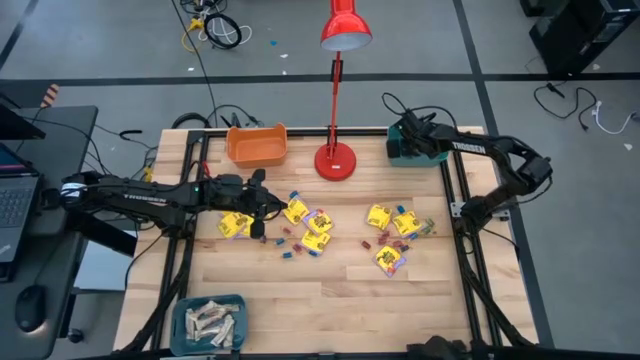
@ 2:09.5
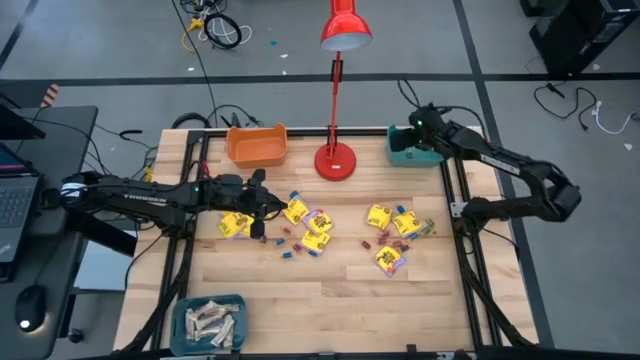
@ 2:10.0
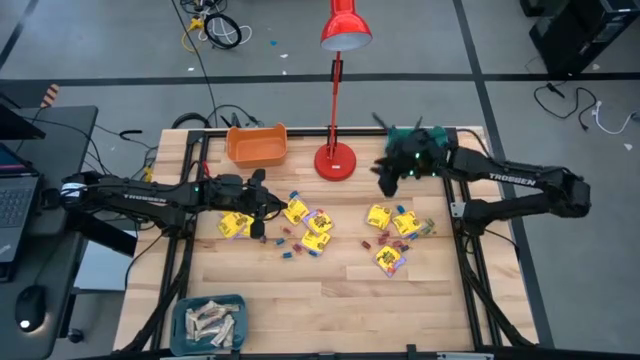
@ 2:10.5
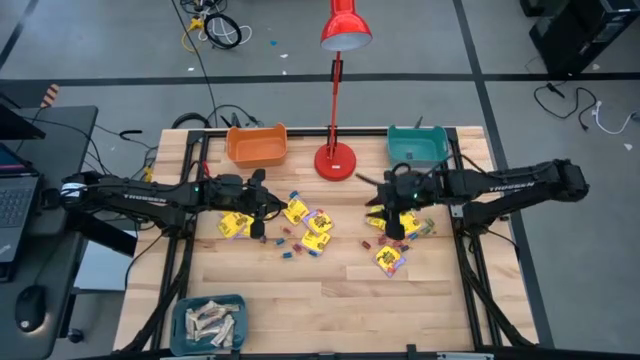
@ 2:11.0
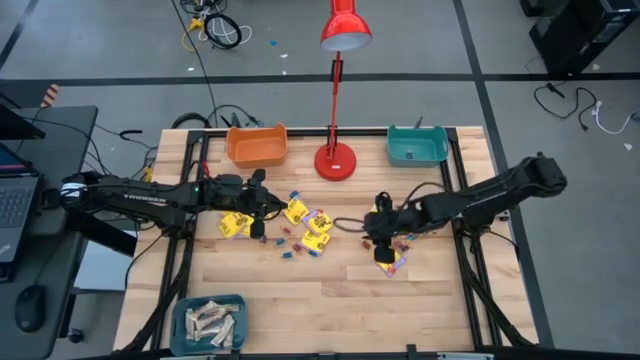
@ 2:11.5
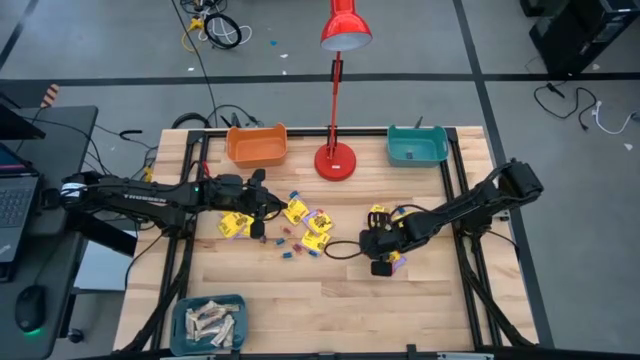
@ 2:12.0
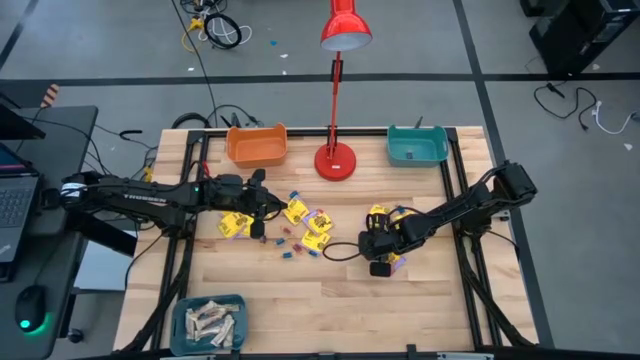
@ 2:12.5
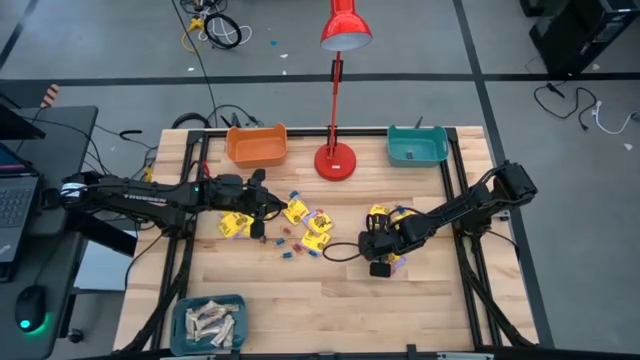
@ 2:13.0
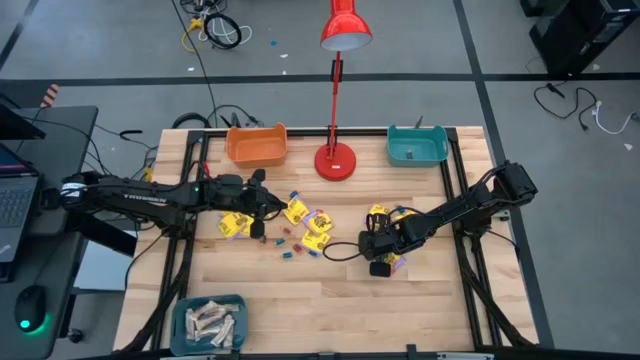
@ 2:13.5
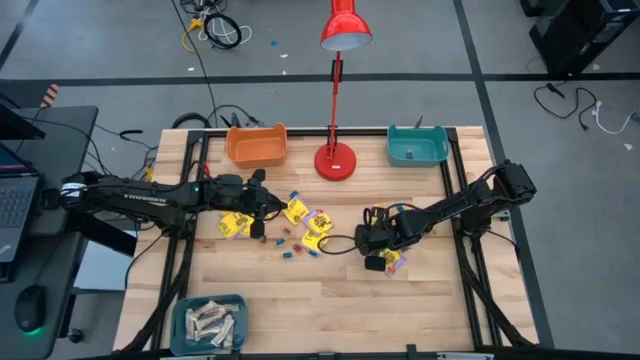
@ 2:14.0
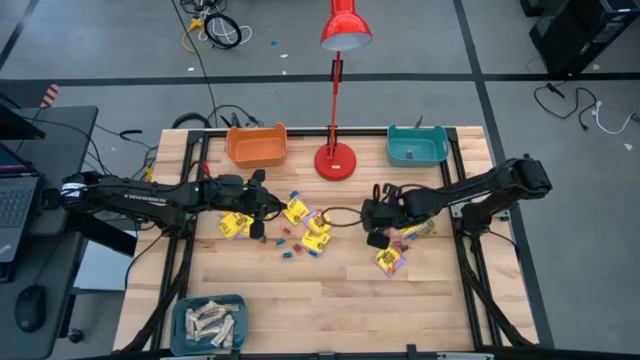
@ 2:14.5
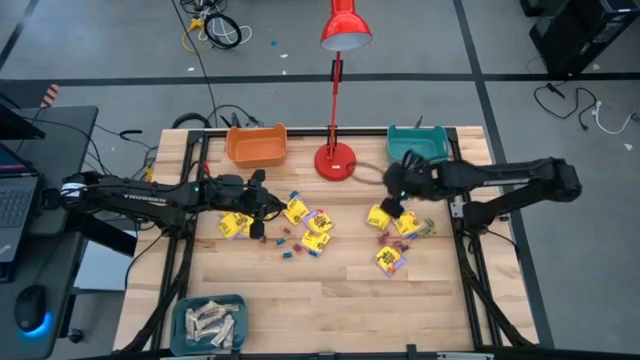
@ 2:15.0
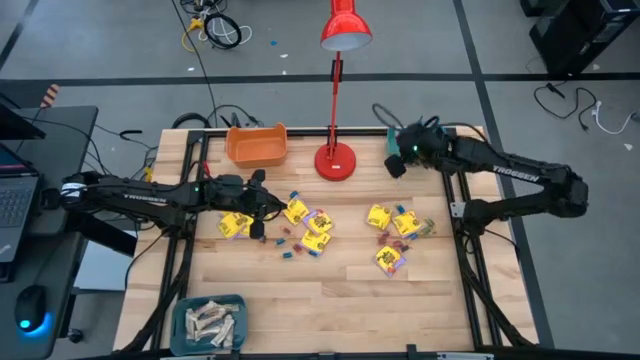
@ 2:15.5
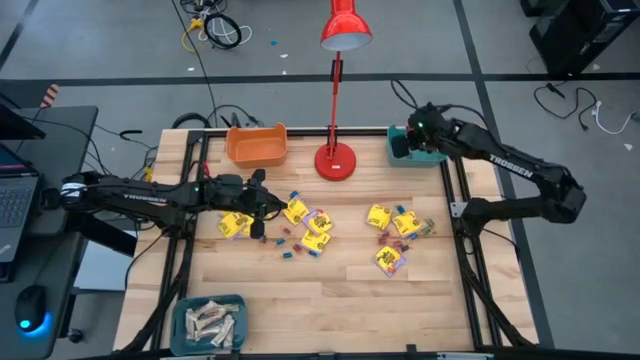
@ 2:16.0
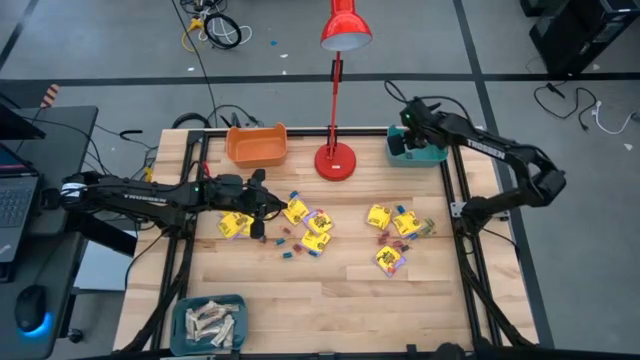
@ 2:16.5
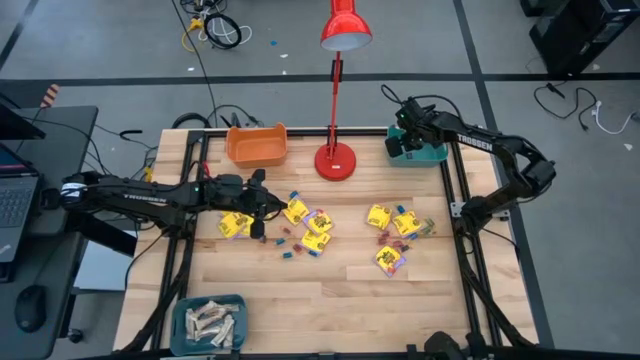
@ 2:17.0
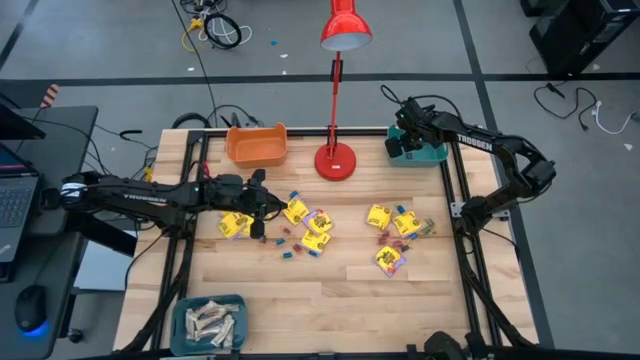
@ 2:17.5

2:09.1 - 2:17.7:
Task: Sort candy
Put the small red candy into the green bin

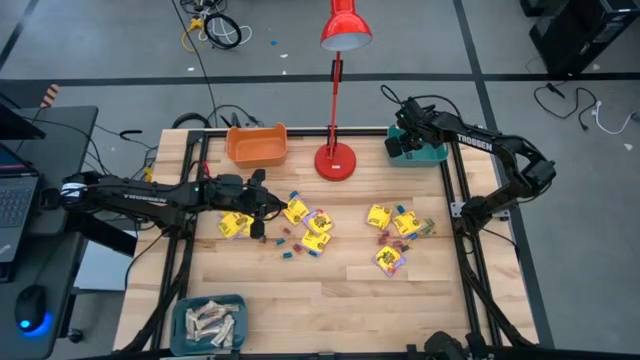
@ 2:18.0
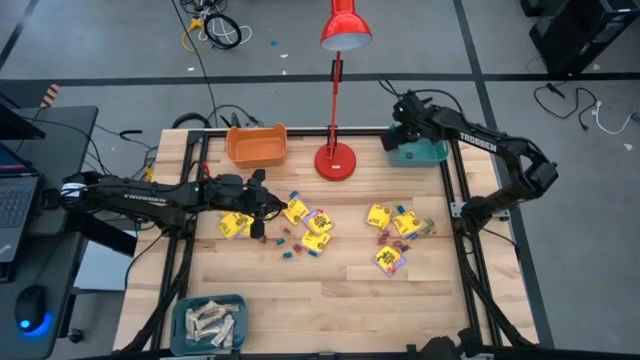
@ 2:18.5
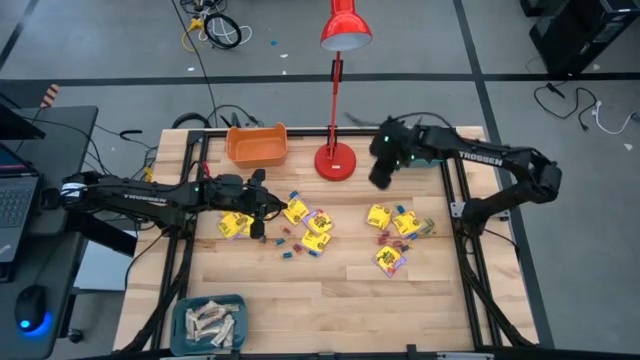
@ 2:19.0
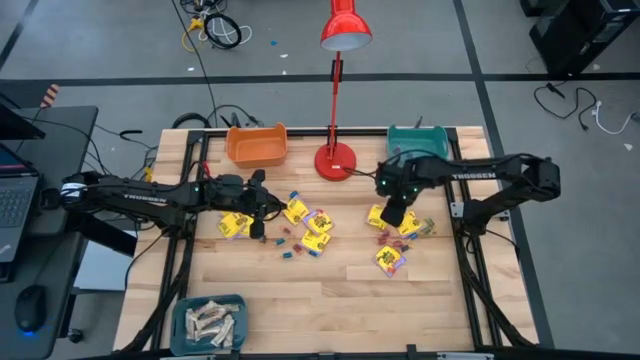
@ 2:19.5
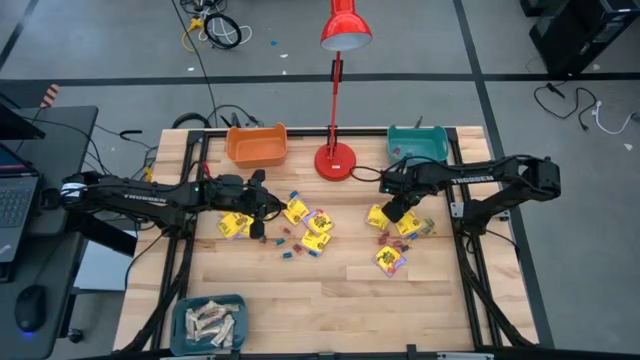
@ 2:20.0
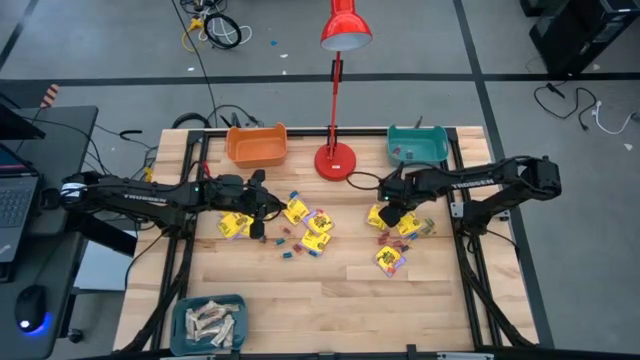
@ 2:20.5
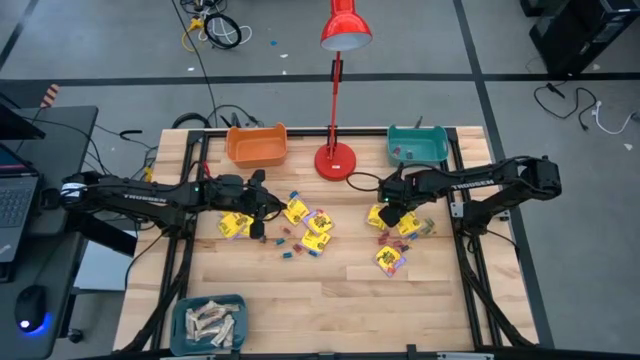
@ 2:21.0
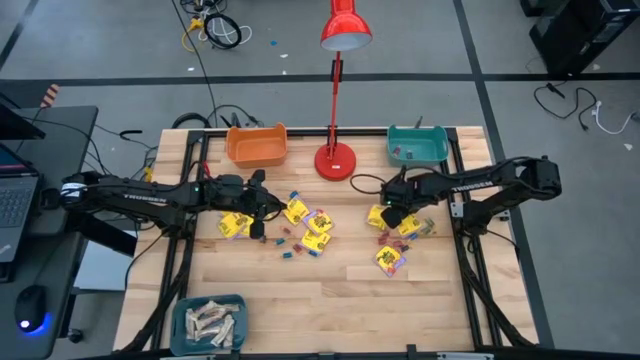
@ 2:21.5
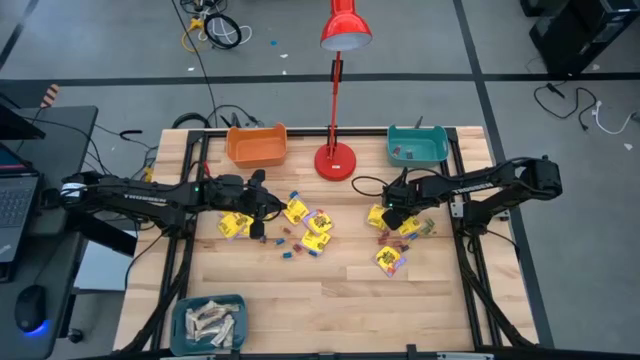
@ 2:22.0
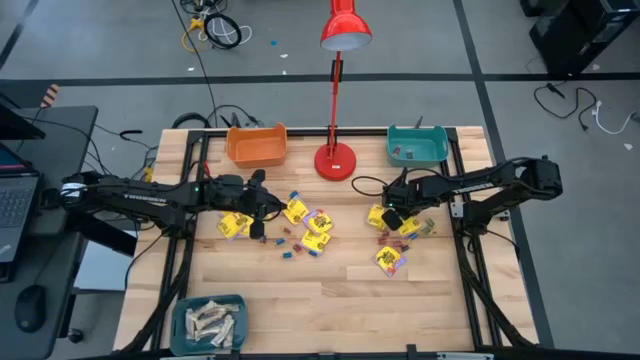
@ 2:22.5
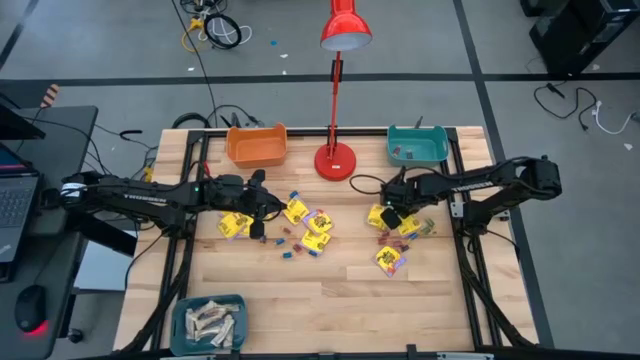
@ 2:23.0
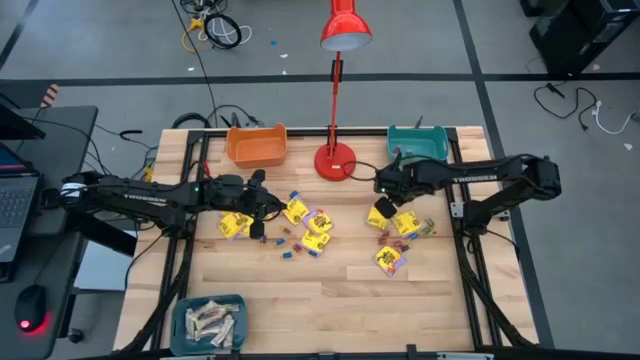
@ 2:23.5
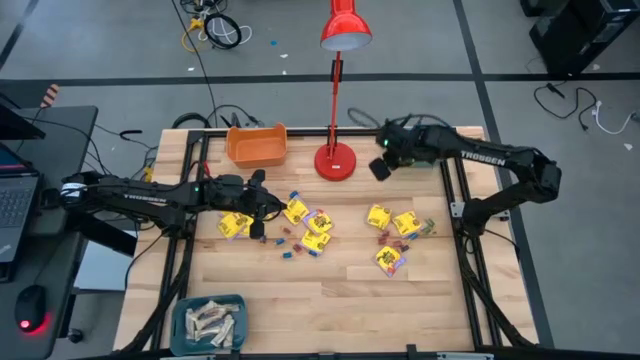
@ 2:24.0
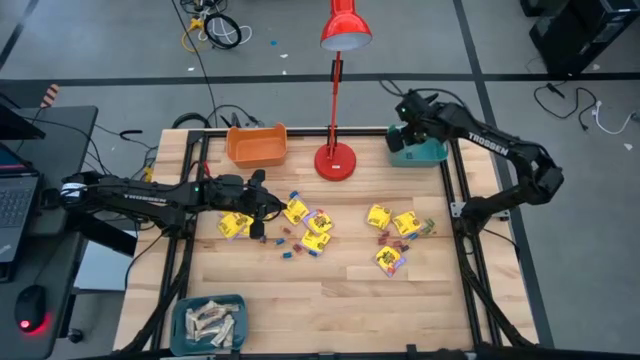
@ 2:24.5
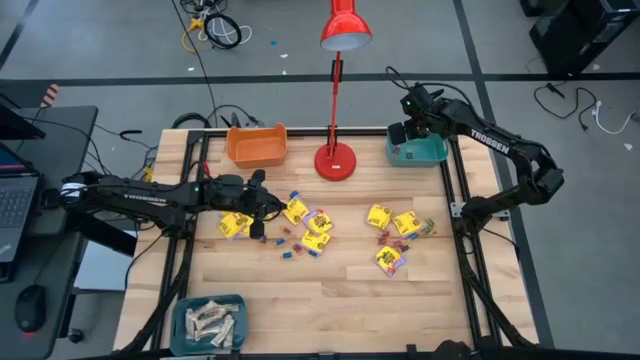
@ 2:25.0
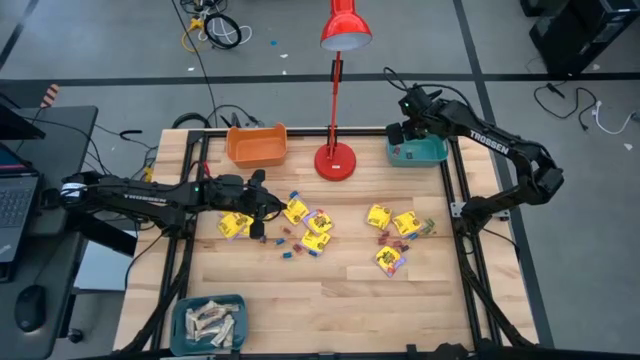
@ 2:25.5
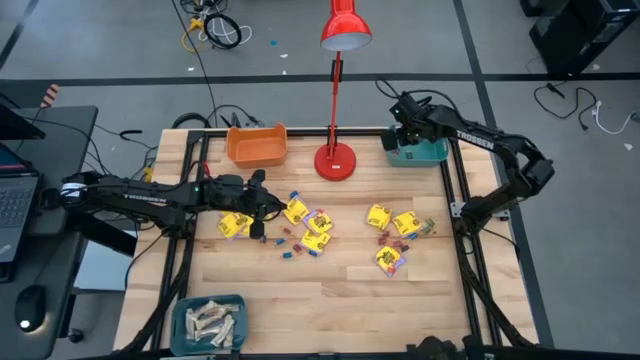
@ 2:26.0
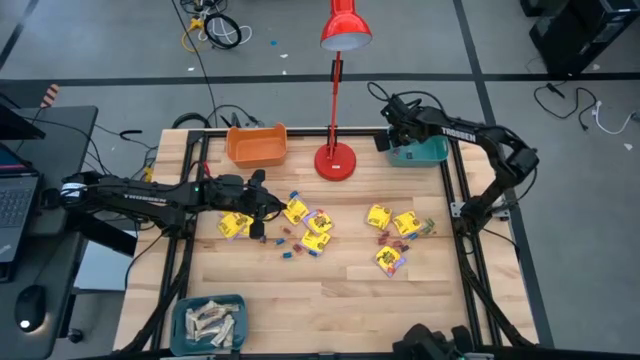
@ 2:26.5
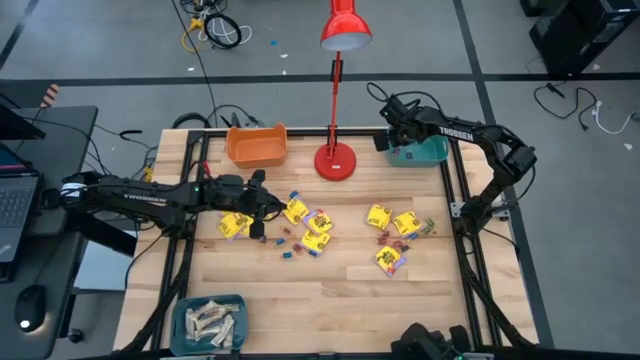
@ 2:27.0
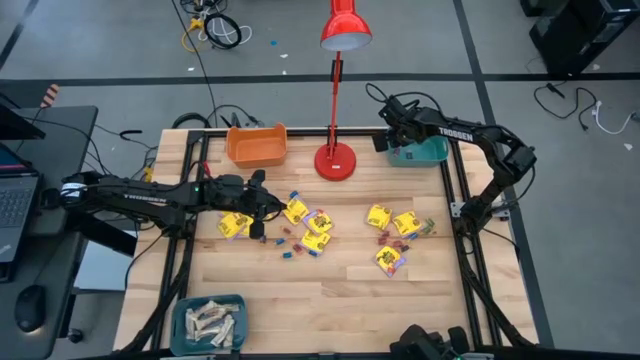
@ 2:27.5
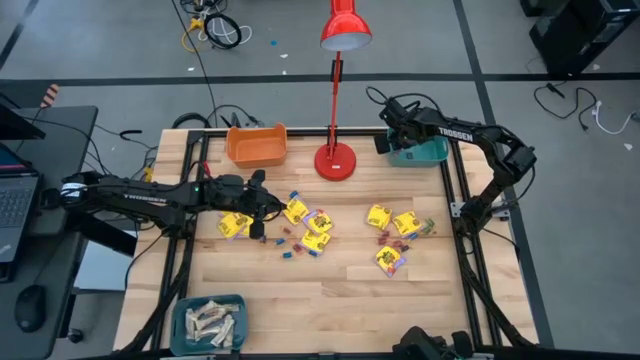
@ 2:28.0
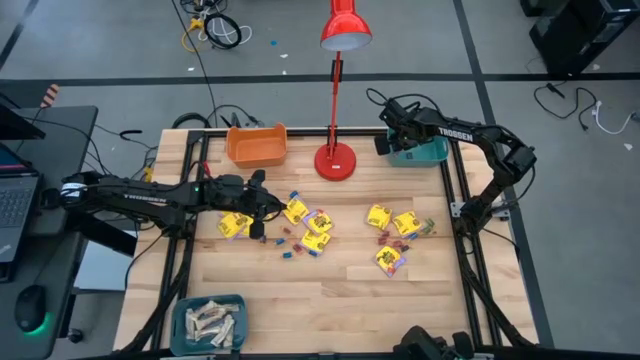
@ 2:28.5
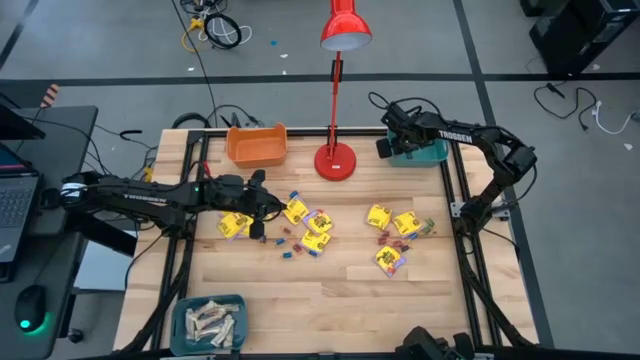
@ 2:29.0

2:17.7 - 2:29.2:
Put the small blue candy into the green bin

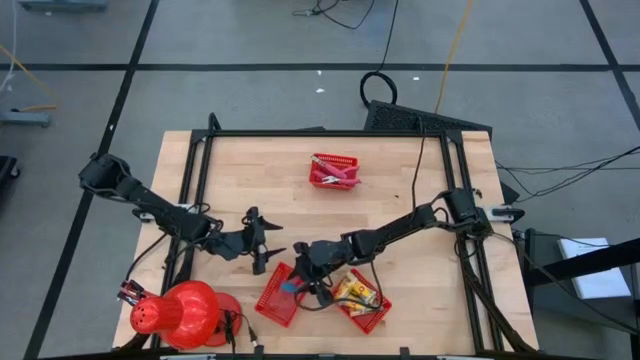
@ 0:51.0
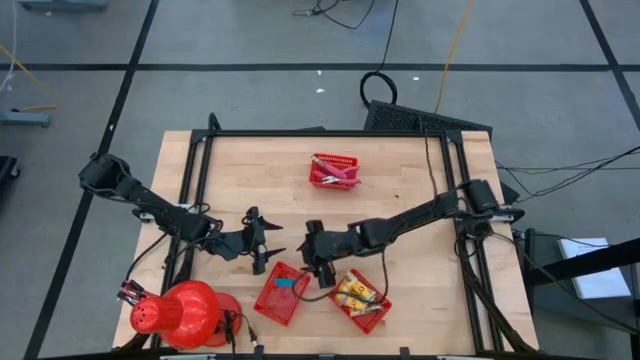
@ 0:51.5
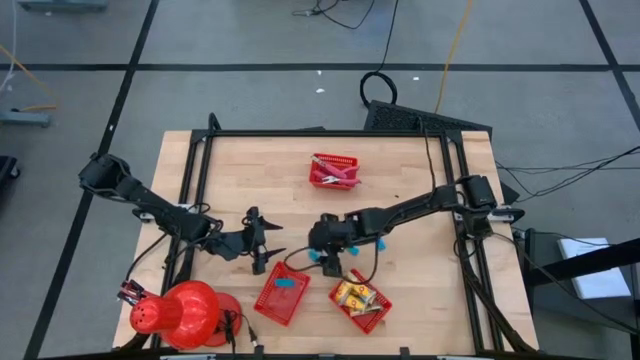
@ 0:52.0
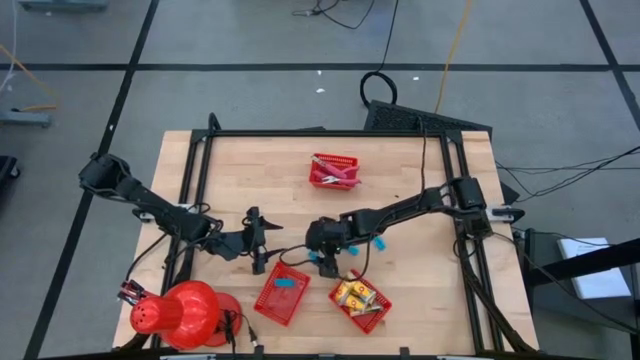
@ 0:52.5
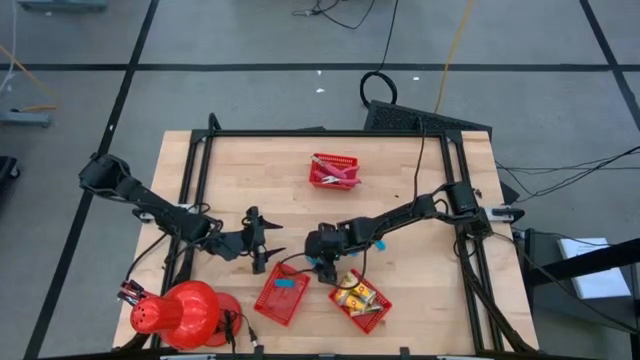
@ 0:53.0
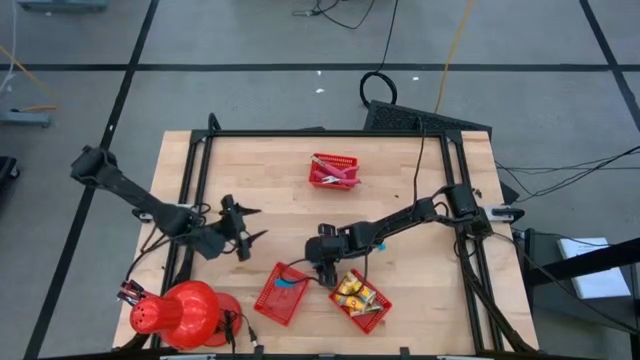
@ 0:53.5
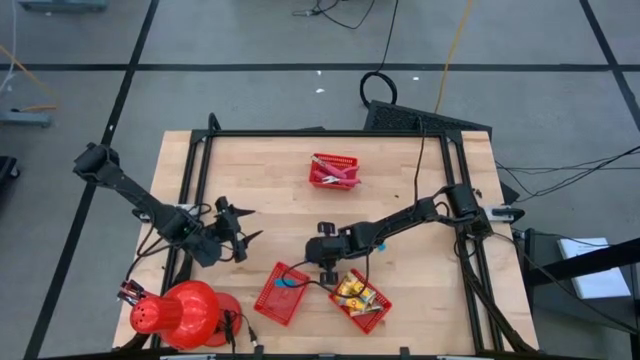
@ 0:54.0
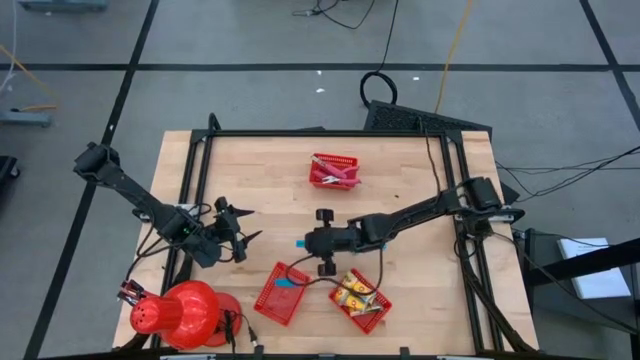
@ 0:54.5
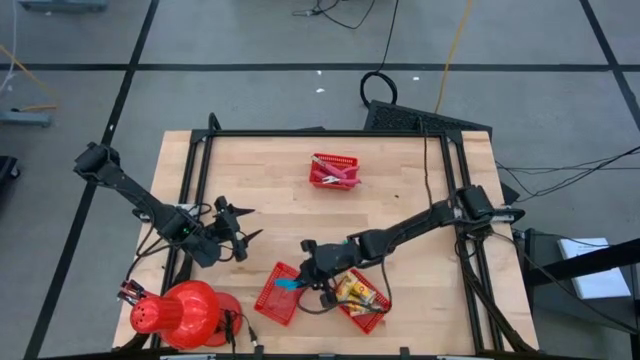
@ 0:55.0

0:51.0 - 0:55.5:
Task: Pick & Place School Supplies
Put the blue eraser into the bottom left red basket
